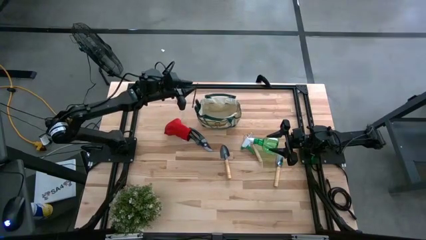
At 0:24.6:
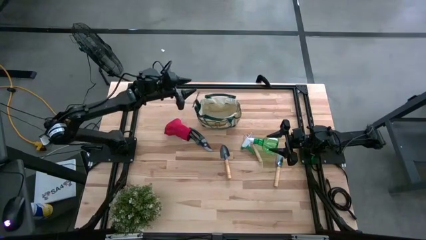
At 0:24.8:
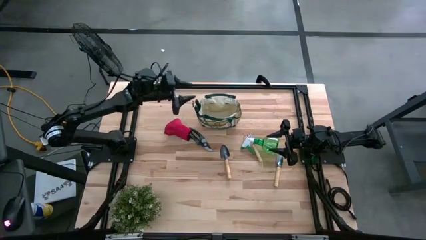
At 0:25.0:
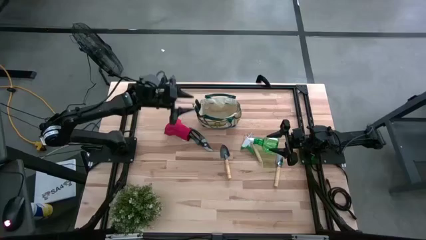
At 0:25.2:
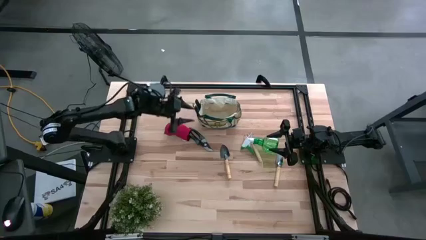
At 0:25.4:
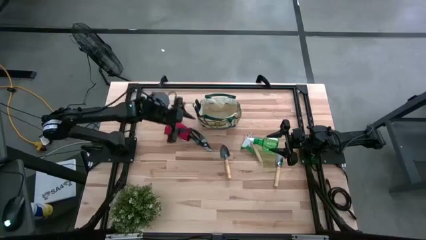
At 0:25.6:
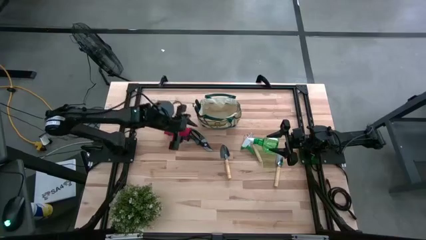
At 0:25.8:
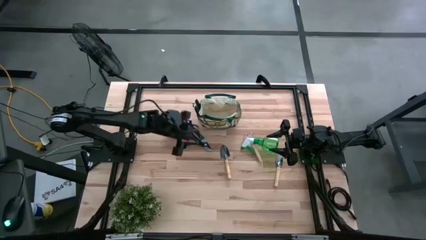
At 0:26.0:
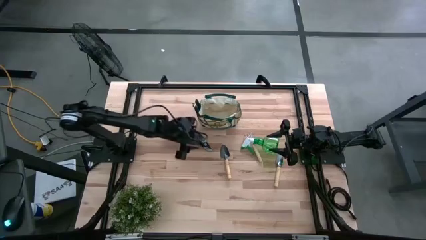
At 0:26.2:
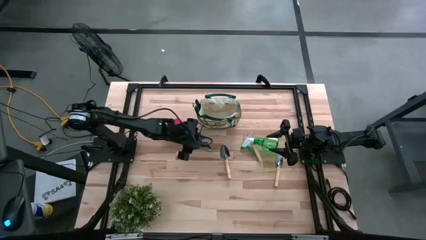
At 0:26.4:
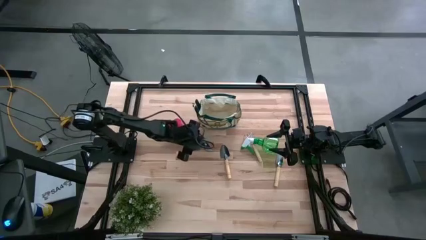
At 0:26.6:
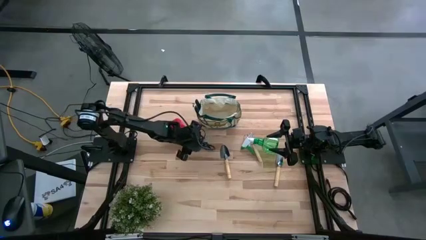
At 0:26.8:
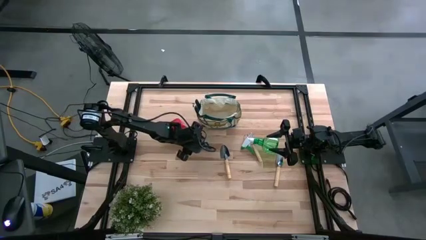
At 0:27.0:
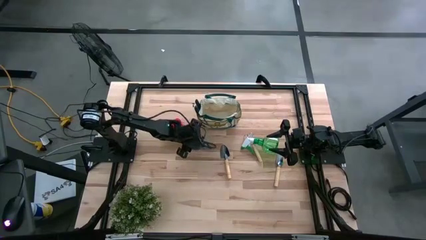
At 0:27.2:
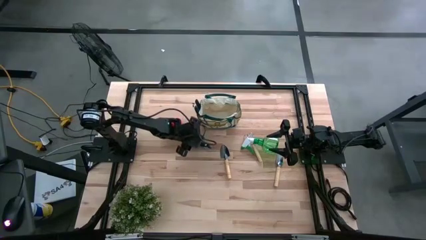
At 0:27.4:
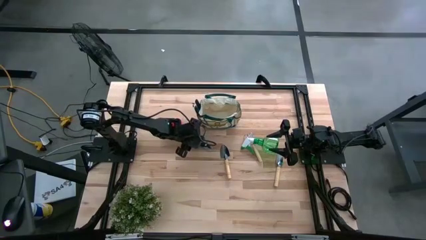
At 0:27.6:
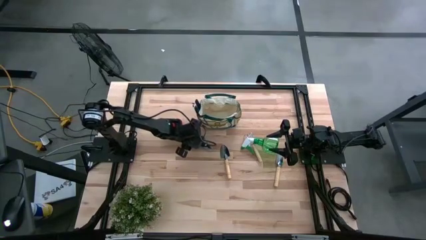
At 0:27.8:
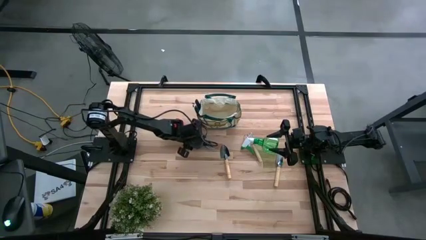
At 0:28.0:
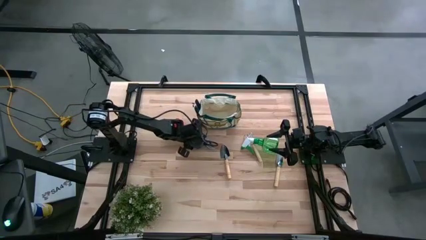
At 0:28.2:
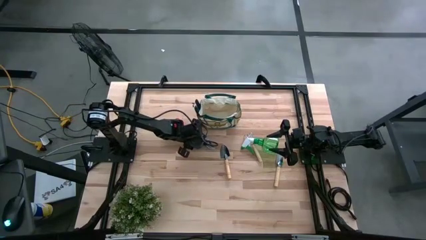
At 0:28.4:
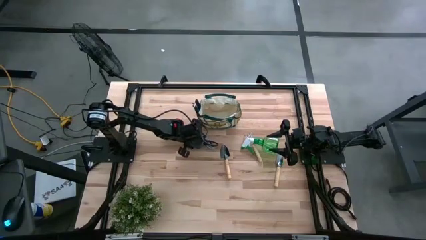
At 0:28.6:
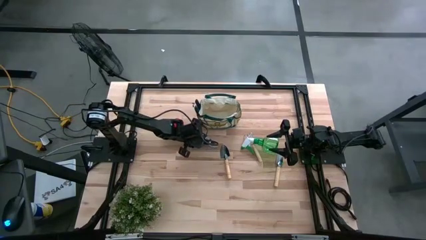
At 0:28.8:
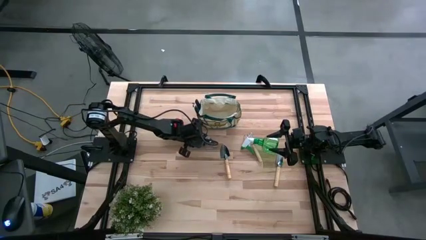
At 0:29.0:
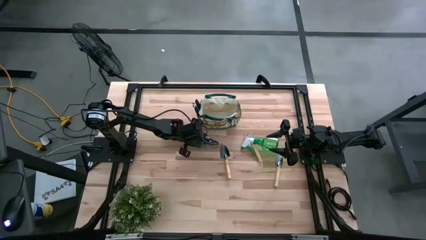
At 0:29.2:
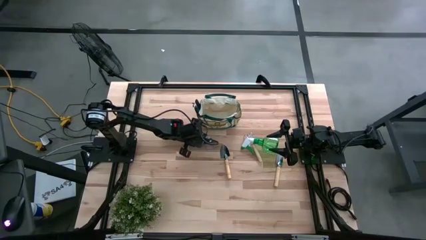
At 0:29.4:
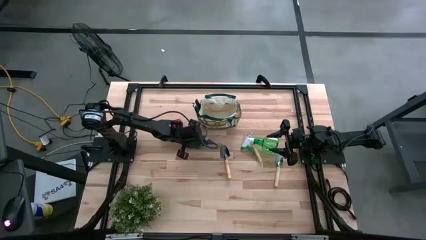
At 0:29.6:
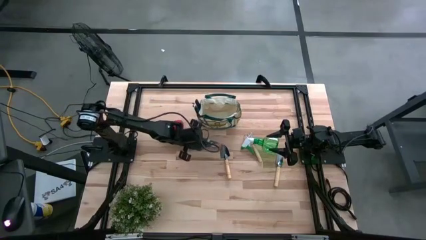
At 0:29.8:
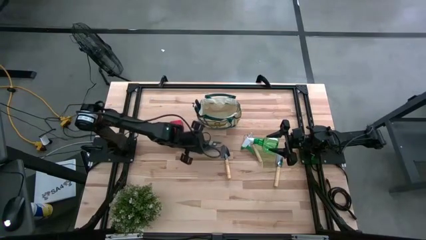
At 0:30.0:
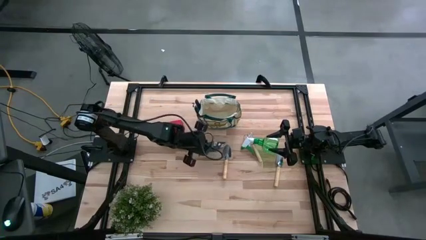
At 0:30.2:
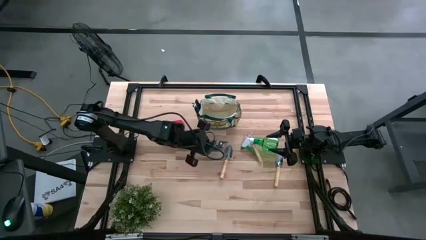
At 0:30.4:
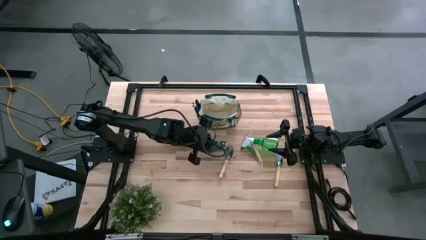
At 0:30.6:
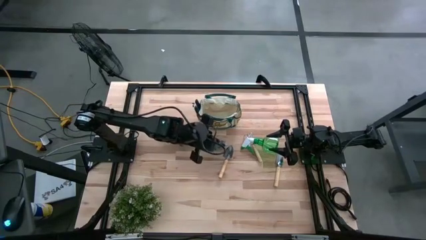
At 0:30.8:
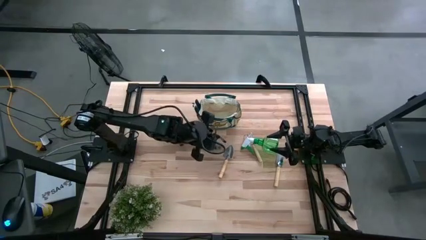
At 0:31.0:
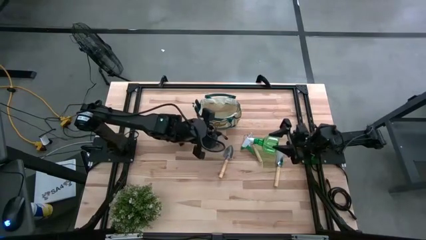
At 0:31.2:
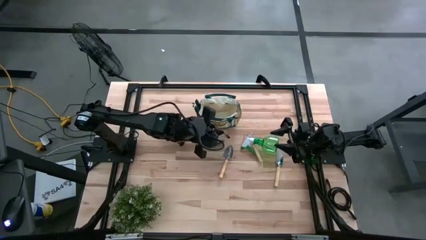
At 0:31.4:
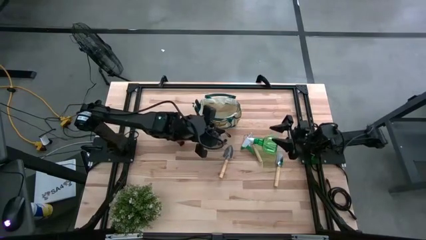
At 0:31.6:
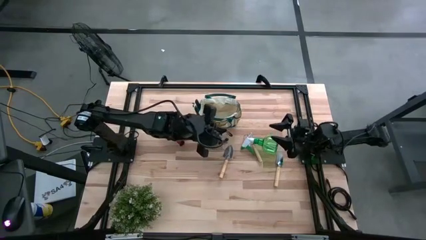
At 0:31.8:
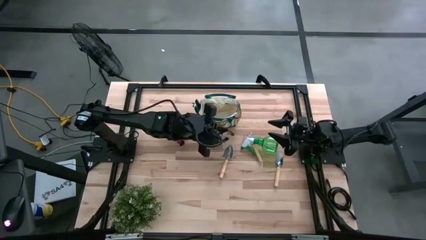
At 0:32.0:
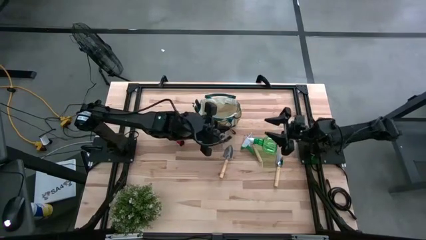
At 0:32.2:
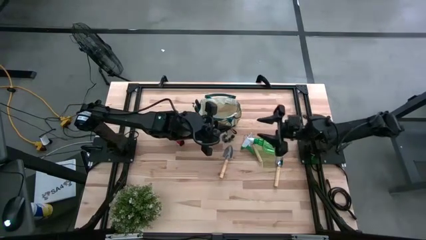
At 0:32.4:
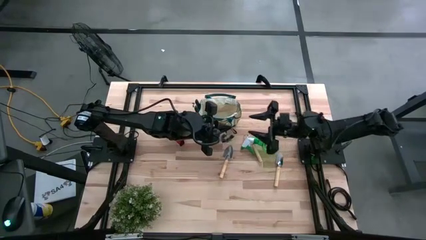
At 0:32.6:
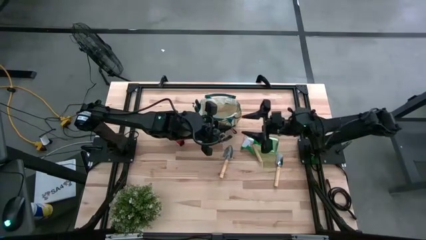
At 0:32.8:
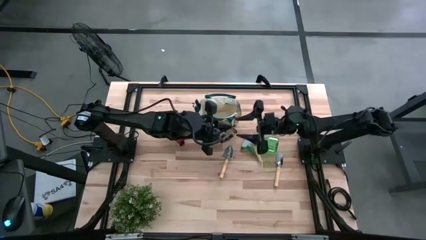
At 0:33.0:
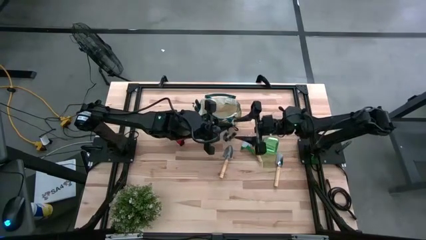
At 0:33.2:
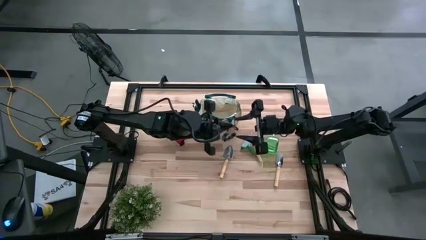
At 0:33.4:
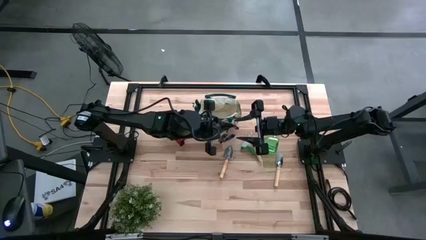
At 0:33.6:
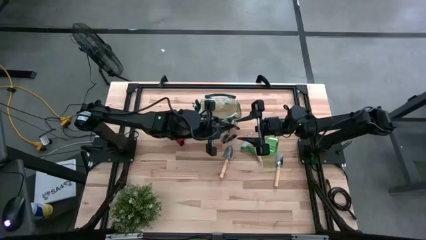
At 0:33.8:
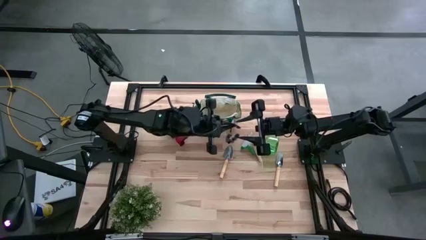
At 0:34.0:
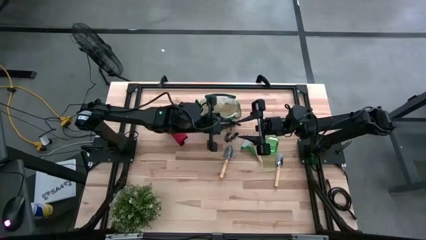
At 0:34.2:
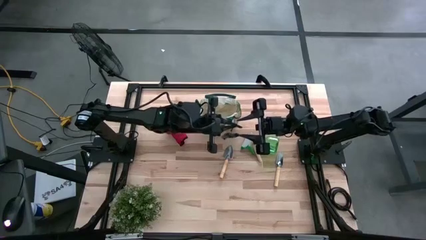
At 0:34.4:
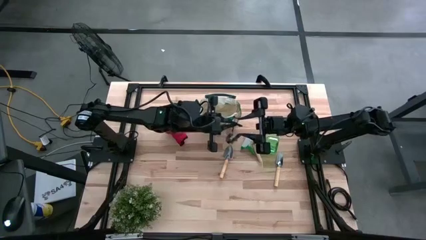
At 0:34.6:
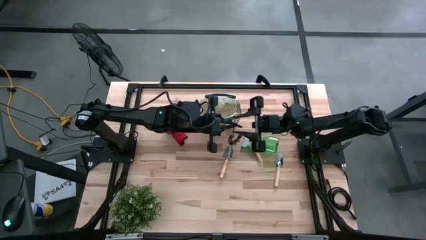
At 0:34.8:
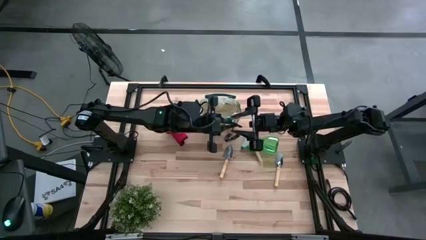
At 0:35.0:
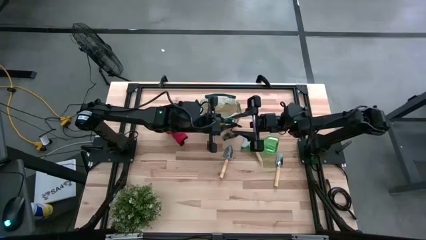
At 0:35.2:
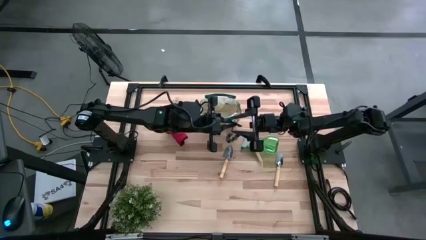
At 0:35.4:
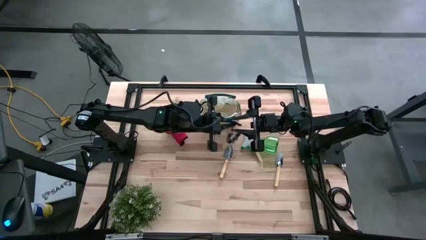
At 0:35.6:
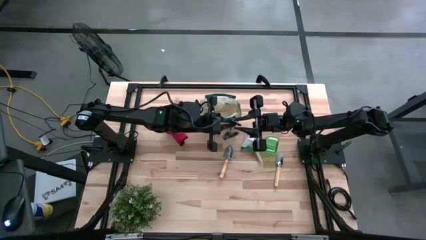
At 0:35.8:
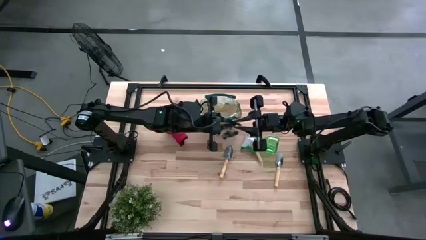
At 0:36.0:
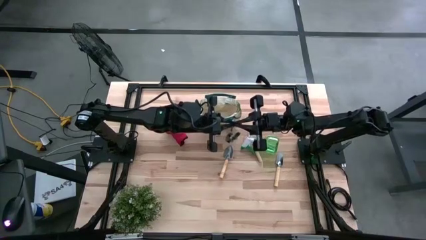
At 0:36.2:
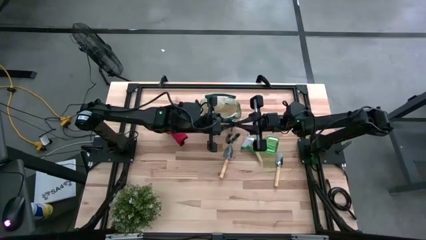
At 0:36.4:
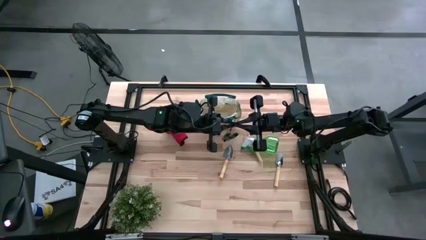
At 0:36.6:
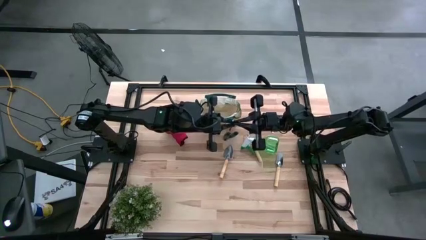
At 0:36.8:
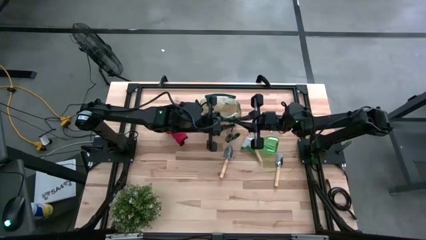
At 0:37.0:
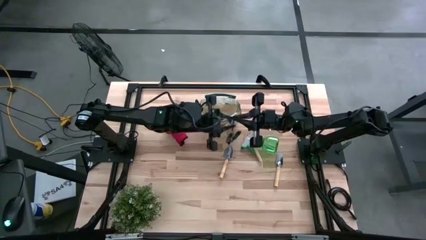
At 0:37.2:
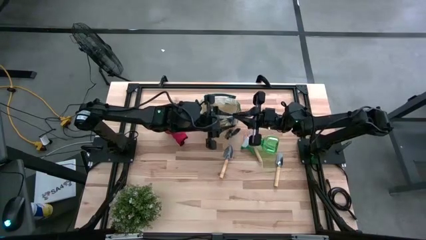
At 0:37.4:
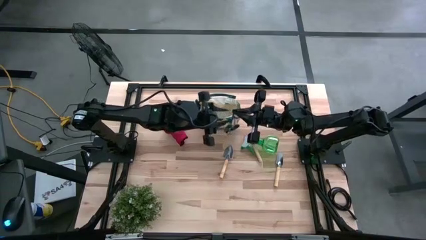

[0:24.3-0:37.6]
Task: Pick & Place Garden tools in Gardening bag
Put the green shear scissors into the gardening bag

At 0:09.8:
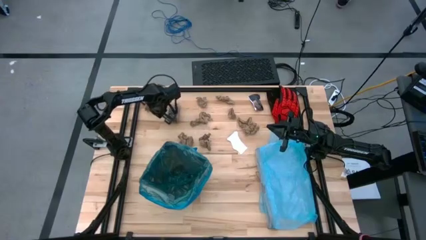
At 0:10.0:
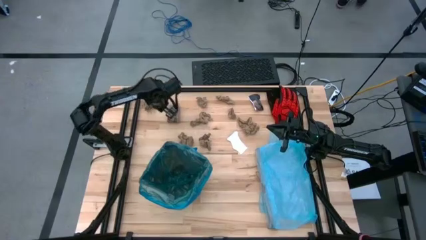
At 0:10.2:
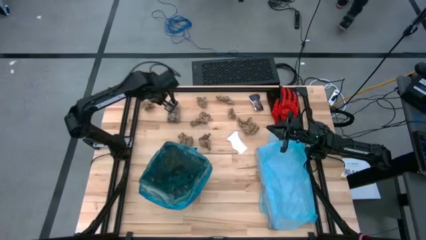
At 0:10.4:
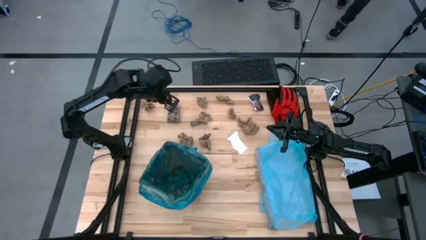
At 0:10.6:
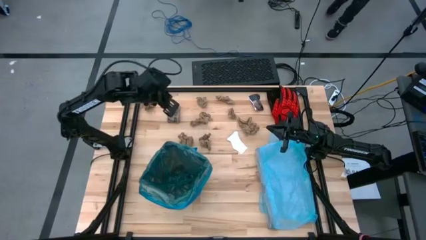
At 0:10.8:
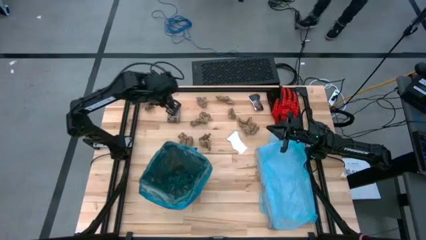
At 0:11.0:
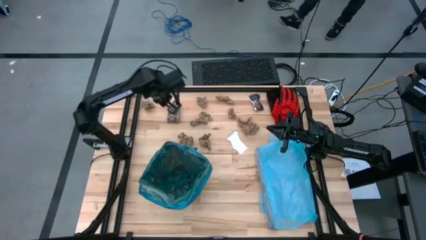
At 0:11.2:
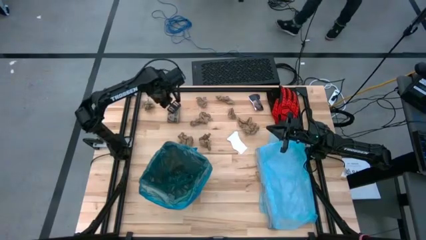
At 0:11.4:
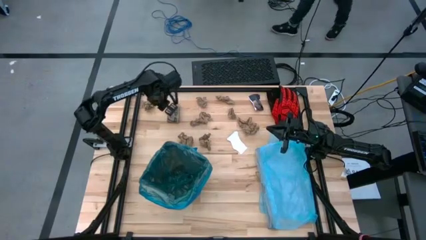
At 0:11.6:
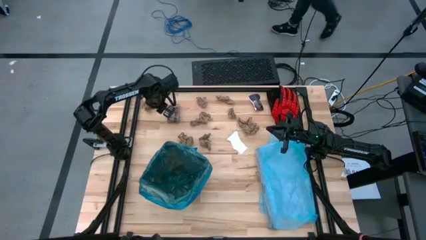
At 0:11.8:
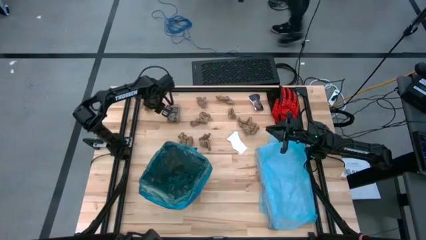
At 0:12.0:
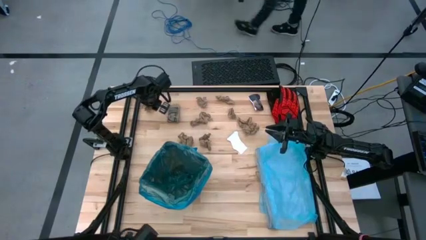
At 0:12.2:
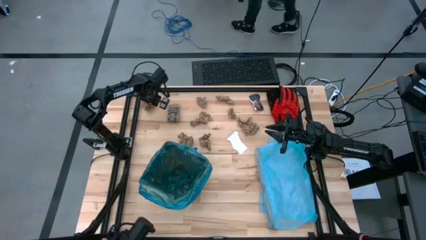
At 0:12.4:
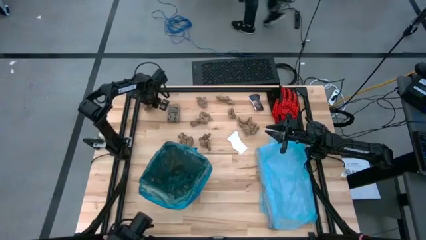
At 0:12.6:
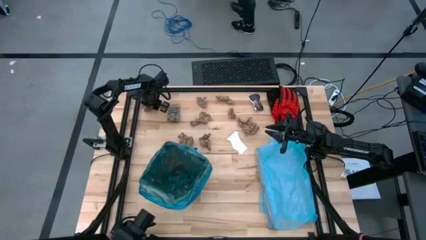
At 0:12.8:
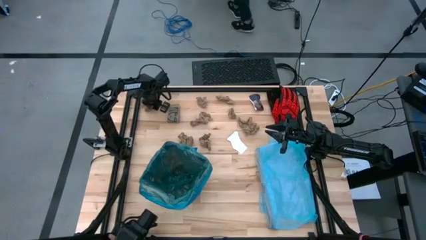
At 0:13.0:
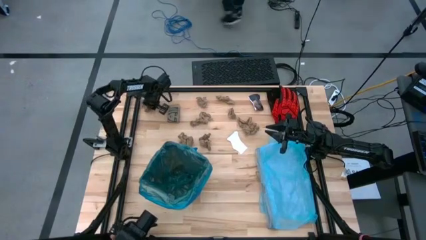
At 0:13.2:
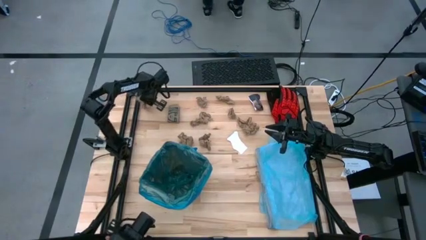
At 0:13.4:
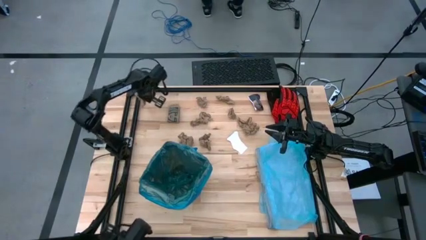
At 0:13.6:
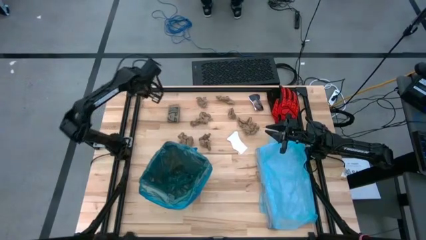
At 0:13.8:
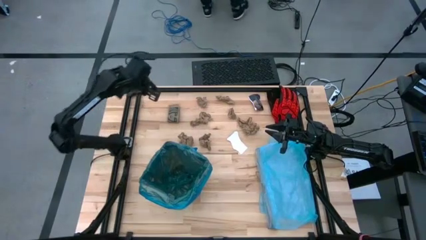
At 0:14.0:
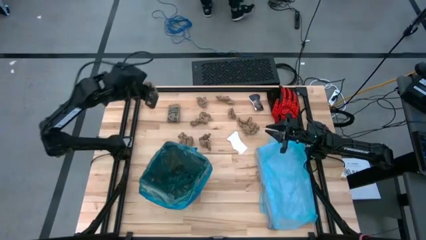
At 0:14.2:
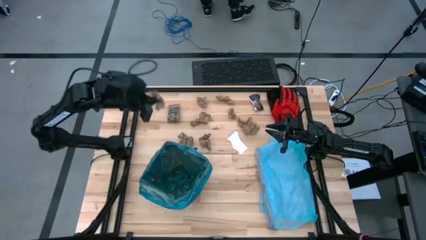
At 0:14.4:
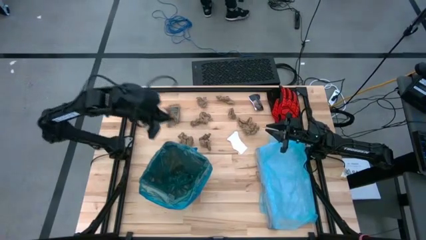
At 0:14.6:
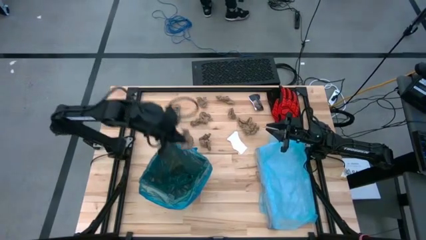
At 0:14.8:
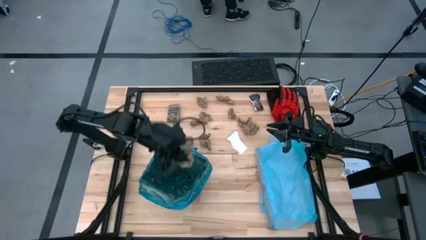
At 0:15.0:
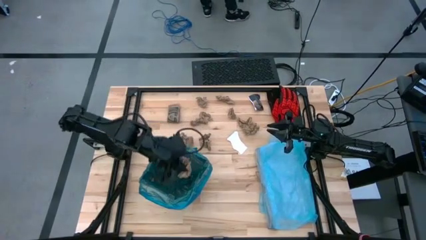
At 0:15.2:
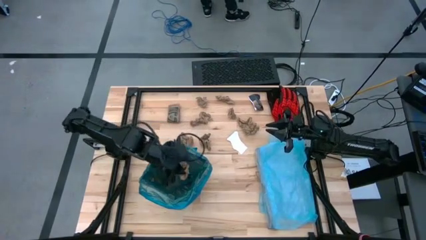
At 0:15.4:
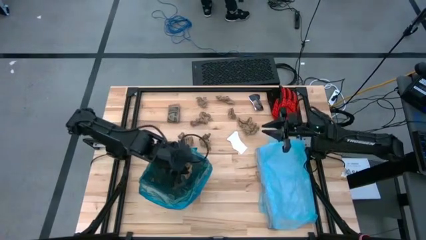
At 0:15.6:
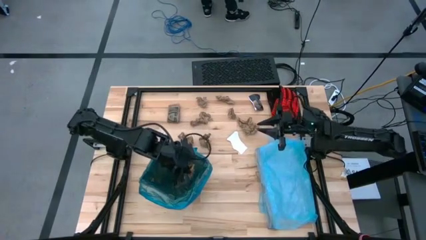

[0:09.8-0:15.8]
Task: place trash/remove bag and relplace
Put the brown napkin into the trash bin
